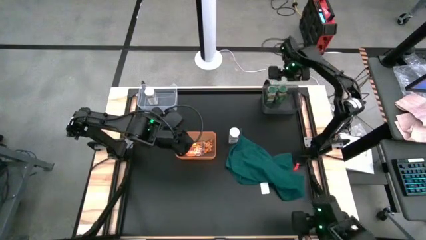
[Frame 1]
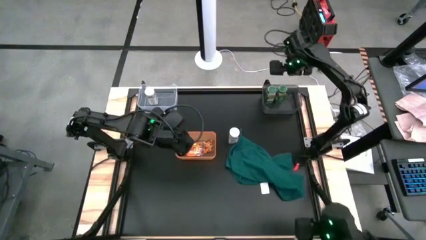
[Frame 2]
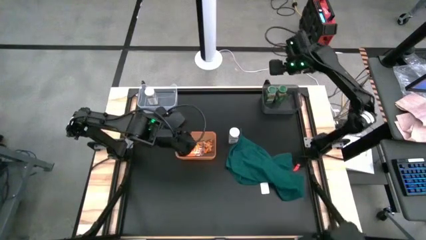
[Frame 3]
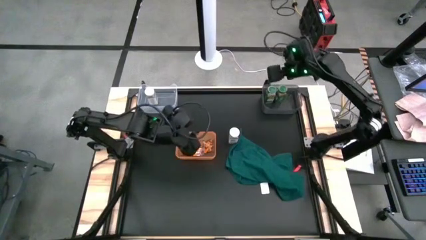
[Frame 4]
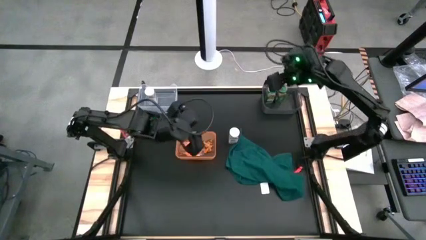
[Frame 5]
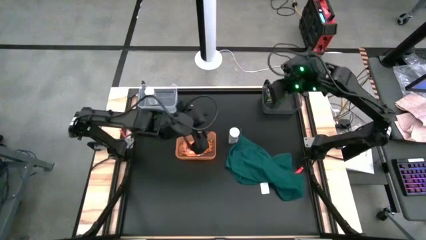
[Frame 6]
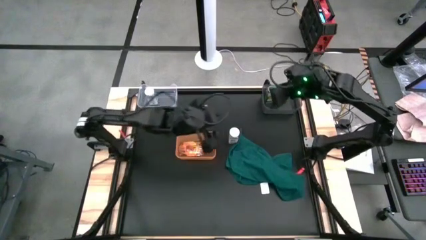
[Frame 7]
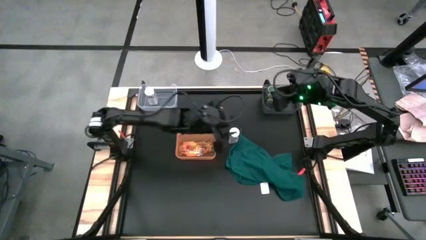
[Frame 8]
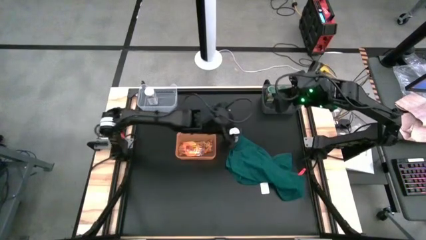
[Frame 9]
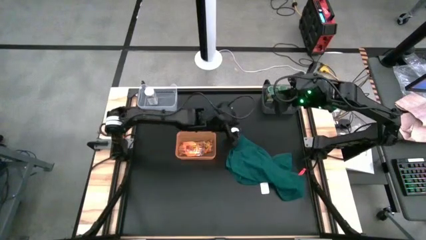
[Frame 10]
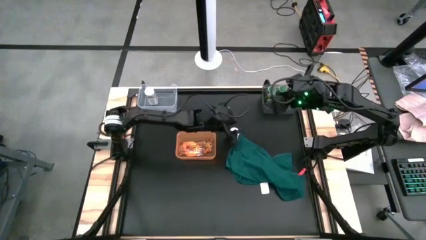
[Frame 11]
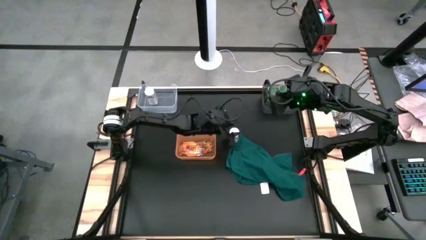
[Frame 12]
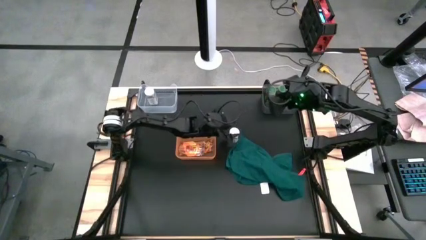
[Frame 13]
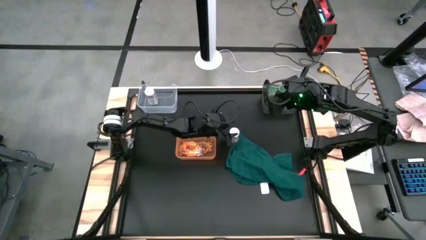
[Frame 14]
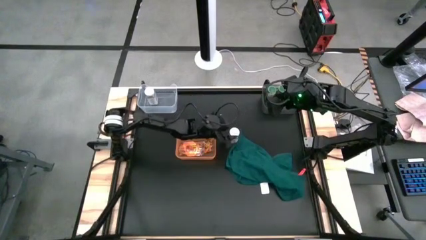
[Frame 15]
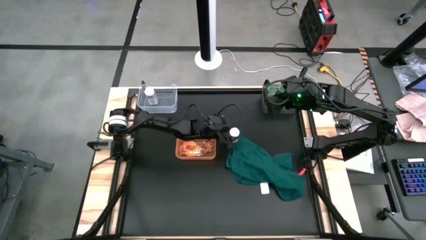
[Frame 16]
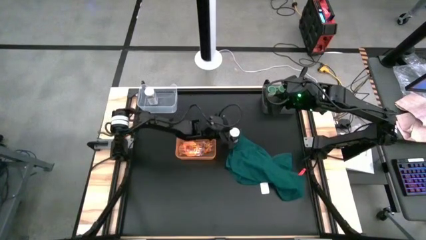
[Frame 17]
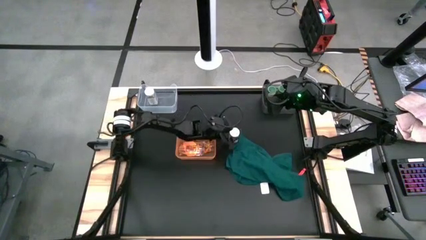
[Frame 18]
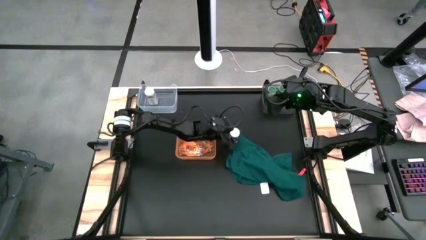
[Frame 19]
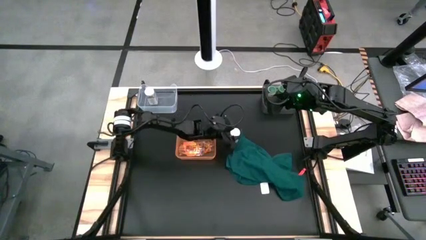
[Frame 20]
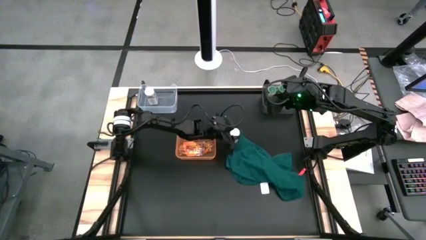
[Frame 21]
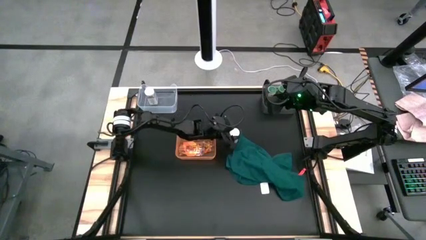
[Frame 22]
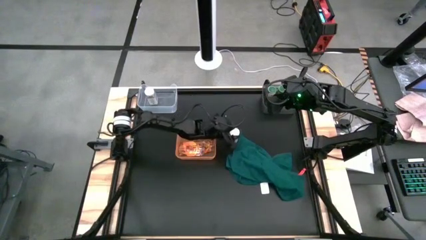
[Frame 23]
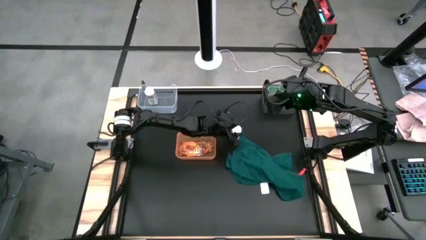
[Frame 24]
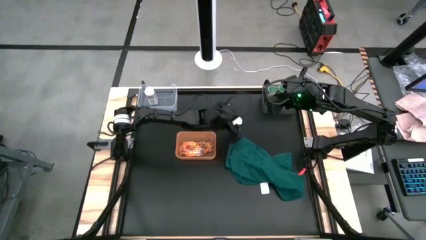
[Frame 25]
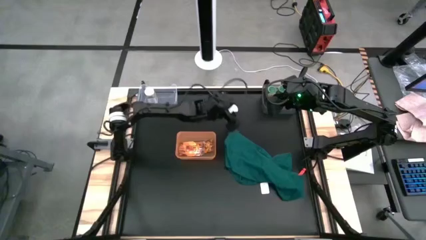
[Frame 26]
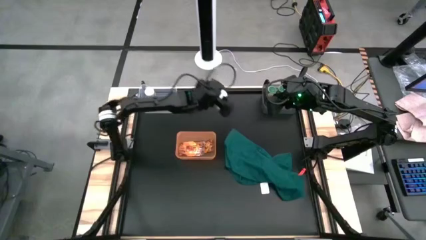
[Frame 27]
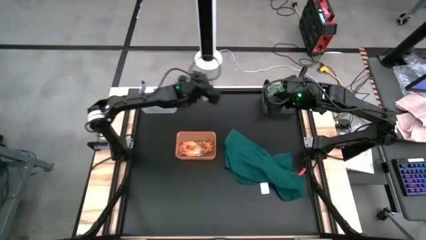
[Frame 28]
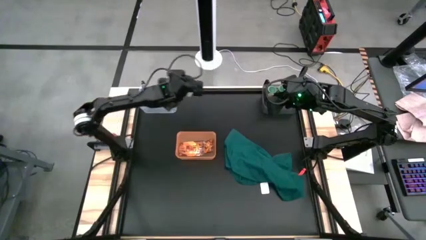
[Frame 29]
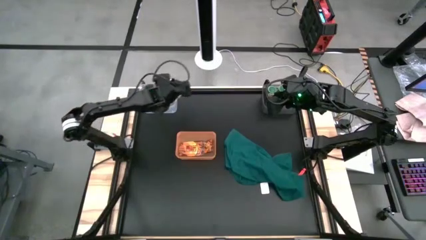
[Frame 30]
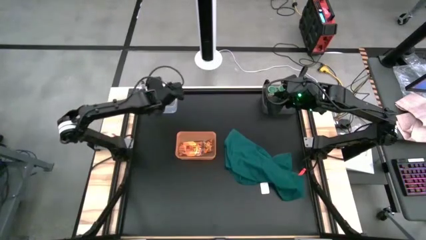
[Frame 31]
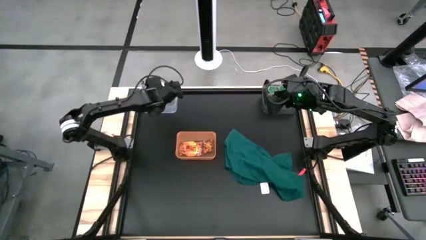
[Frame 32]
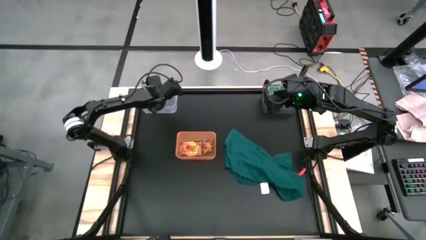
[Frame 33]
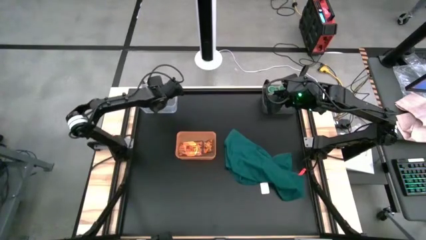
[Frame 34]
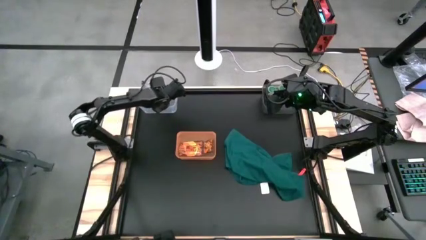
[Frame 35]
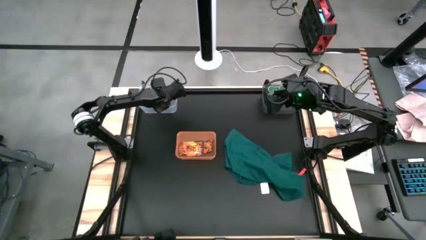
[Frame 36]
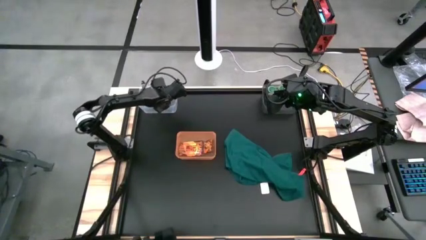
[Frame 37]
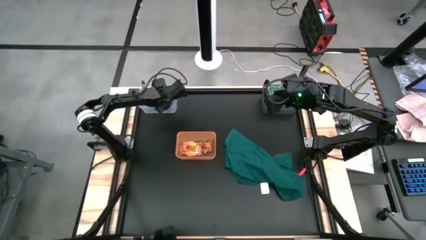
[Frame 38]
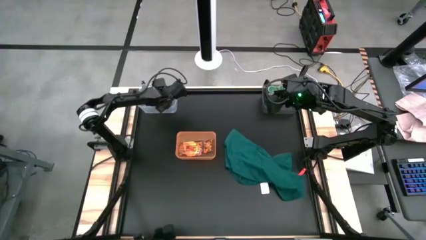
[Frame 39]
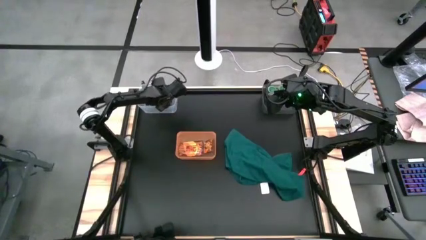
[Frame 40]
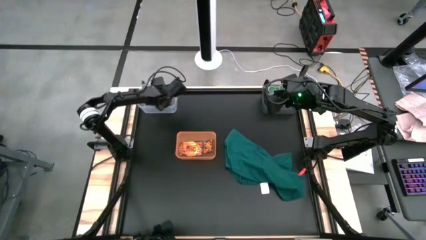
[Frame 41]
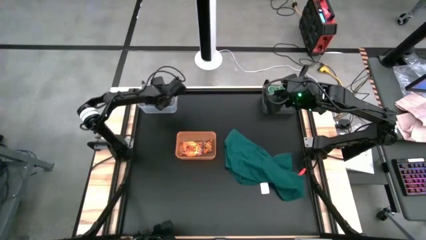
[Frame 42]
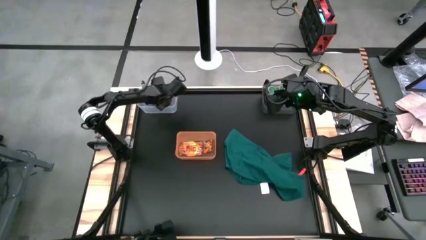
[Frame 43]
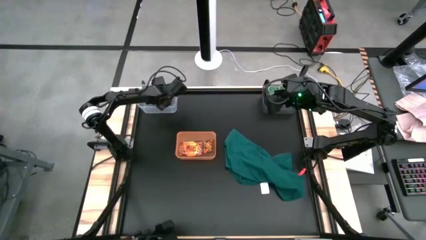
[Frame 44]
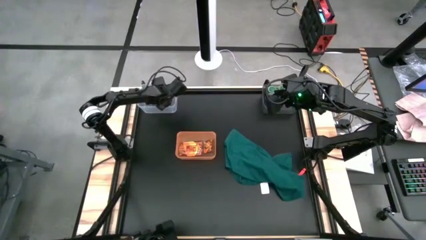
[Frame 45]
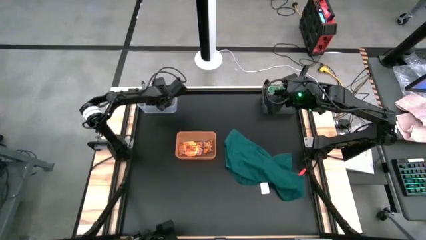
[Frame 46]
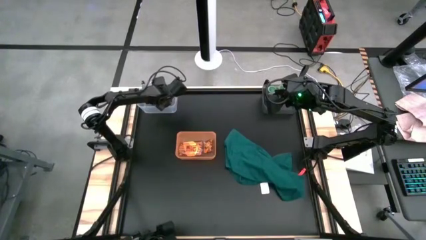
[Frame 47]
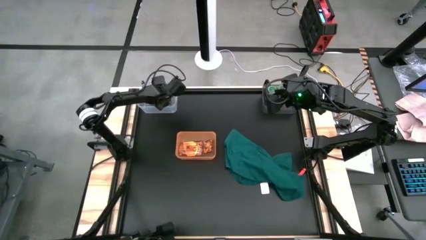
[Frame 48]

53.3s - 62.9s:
Task: Sort spices by type
Put the white seasoning bottle into the transparent bin

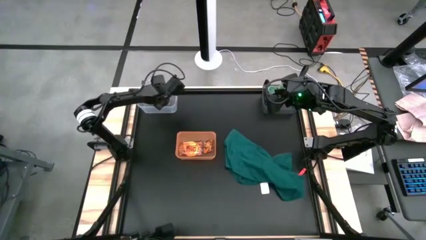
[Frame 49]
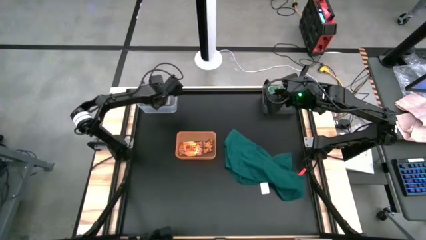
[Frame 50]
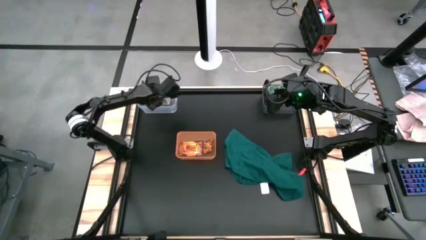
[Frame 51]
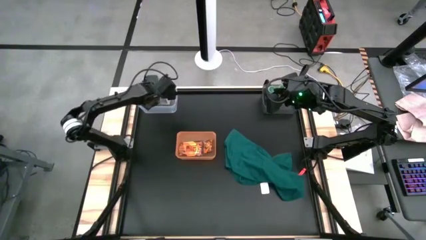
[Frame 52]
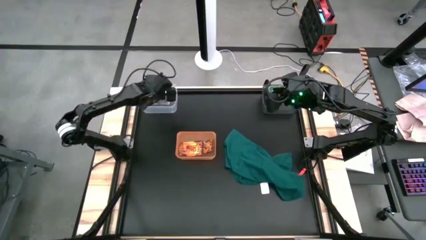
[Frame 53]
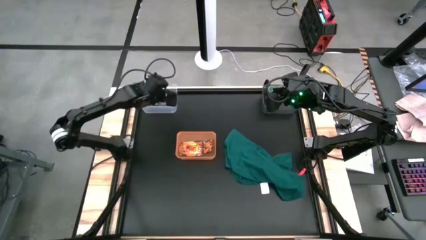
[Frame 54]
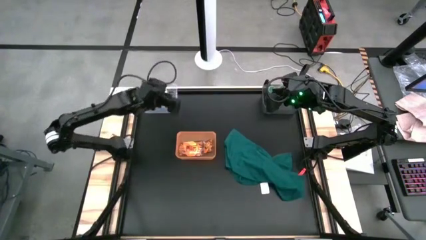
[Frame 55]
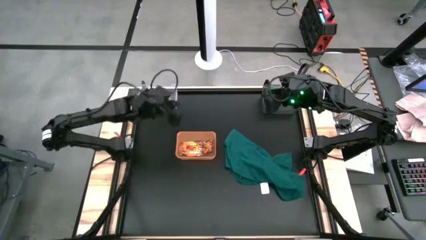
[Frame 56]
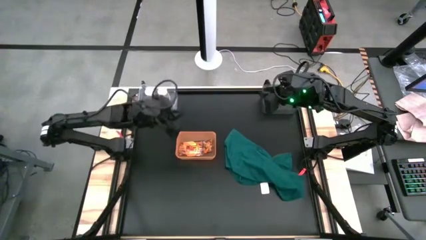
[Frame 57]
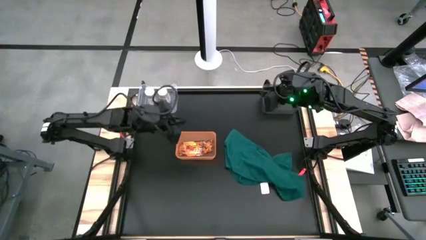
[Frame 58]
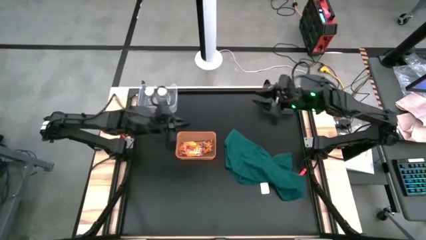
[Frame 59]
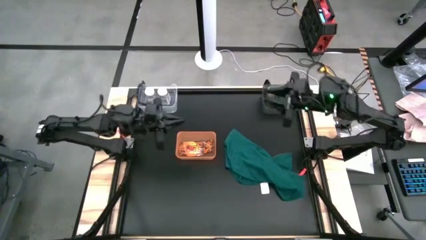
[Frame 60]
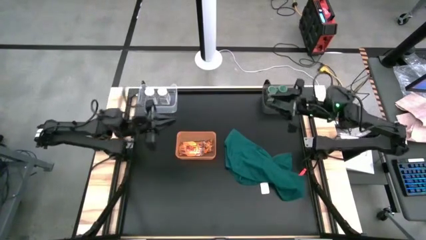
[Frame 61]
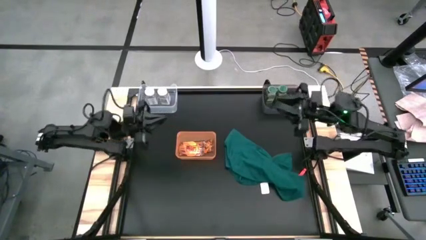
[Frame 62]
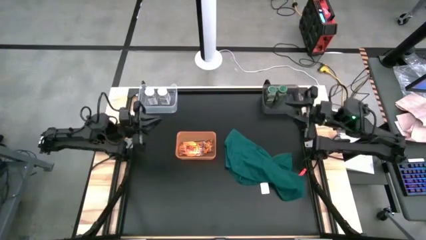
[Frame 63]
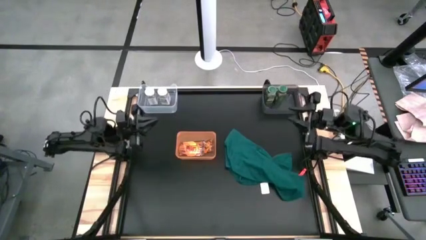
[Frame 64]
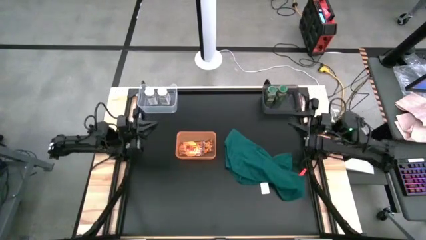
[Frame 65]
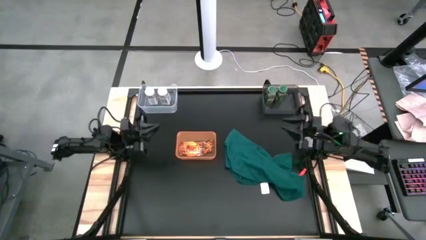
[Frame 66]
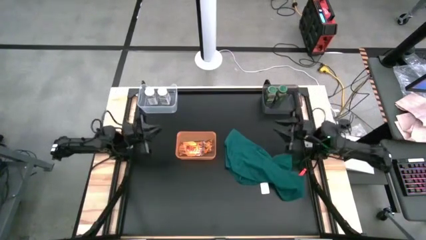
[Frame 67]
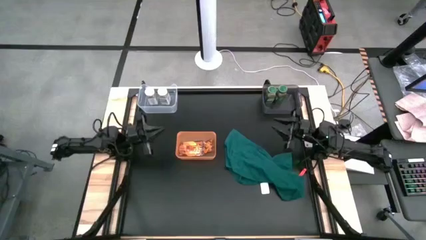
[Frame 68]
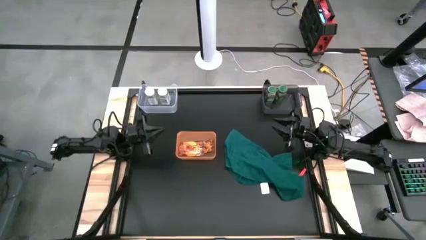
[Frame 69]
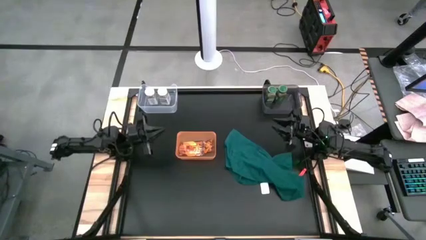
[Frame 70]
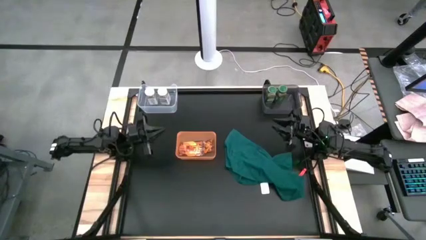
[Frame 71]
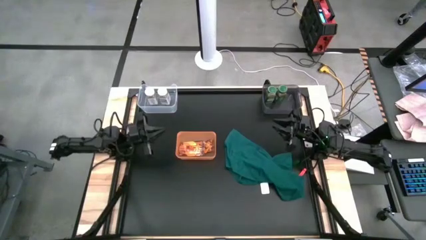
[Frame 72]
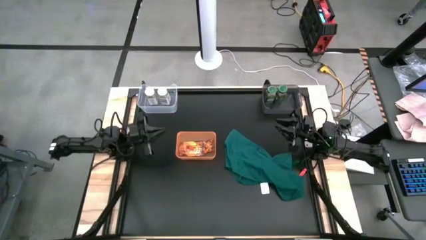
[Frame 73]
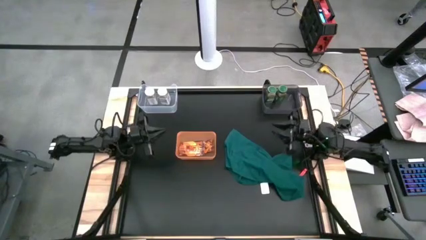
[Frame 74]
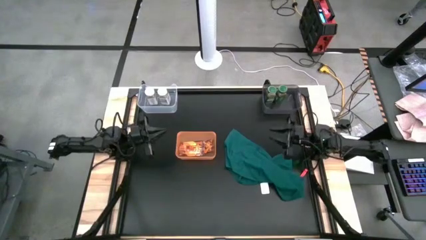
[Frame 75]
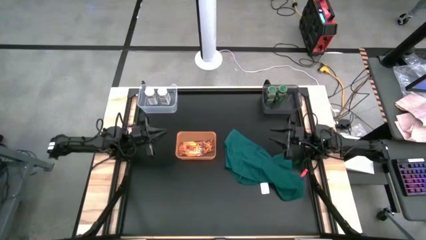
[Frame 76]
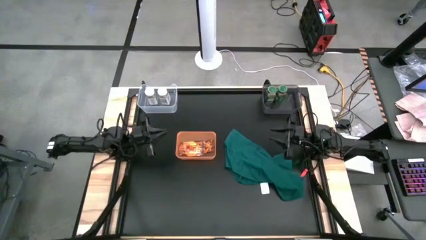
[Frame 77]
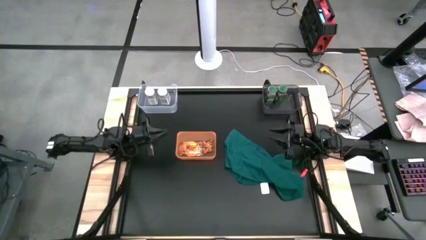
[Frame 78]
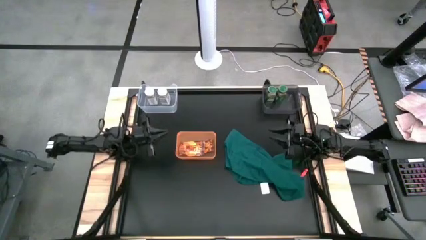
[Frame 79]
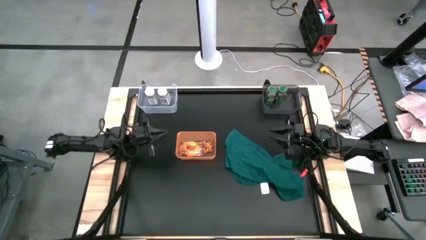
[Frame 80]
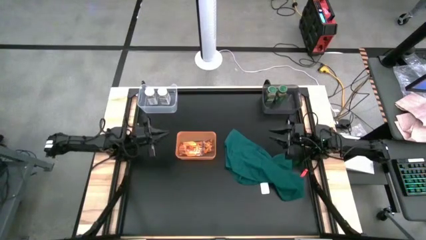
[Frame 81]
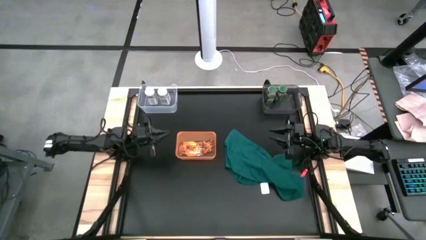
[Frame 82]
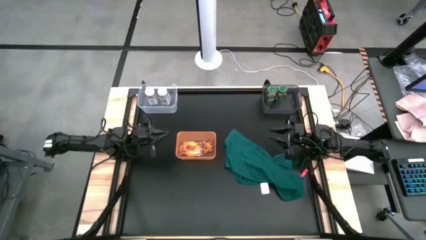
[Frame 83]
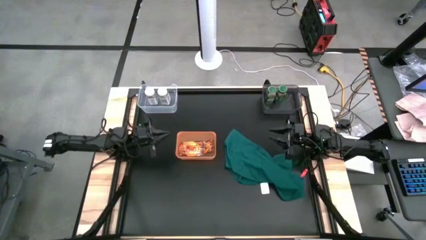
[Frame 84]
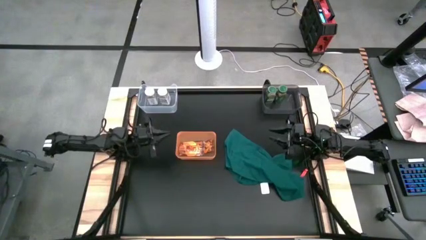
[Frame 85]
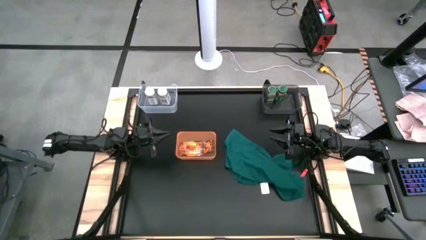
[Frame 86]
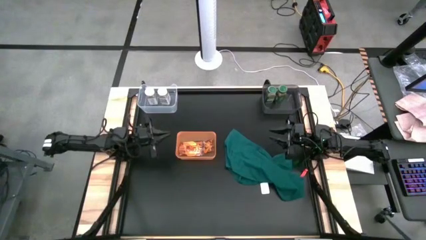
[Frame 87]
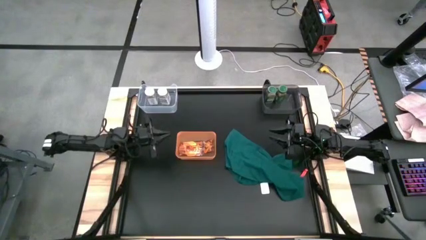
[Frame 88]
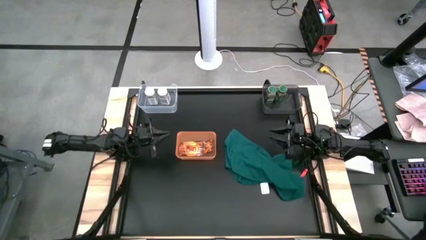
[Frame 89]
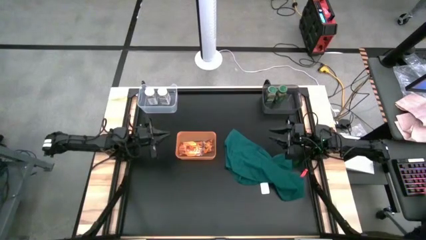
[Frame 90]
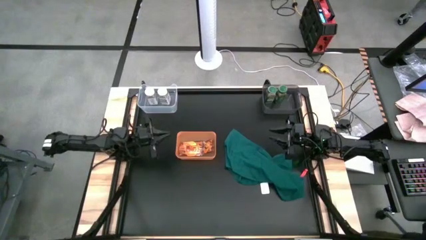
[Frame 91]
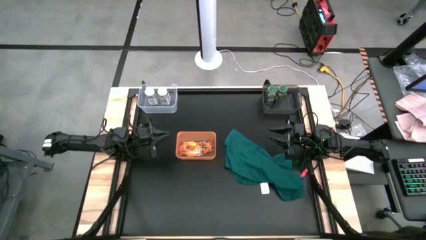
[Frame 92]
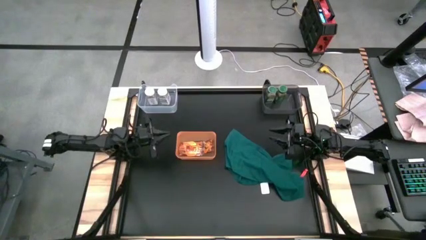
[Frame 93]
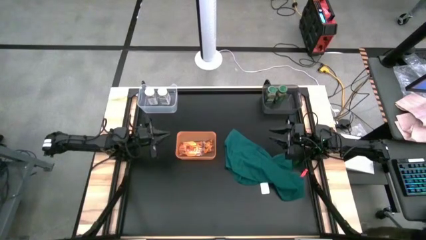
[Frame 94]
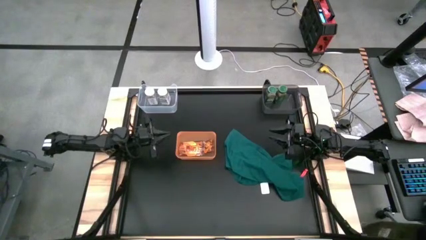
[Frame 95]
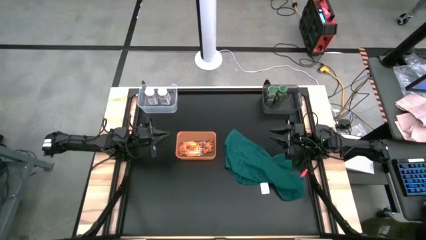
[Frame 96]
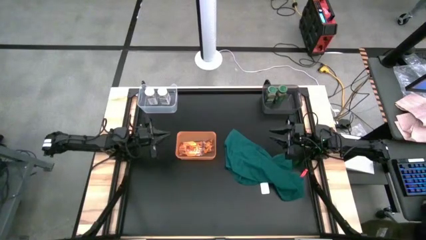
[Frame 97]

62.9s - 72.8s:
Return to Home Position
